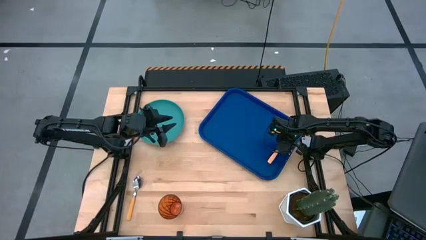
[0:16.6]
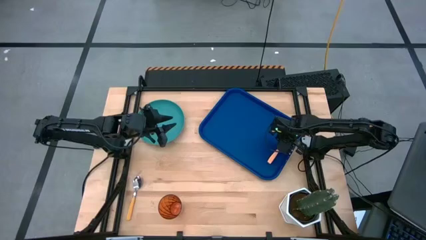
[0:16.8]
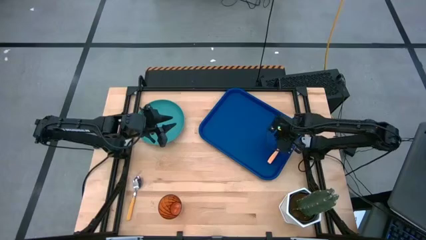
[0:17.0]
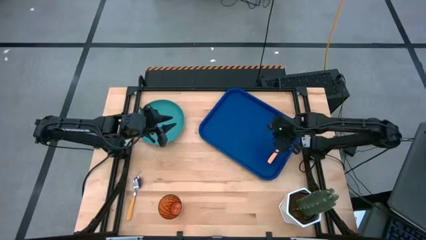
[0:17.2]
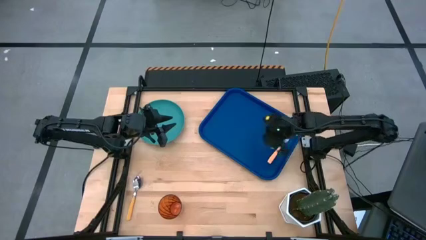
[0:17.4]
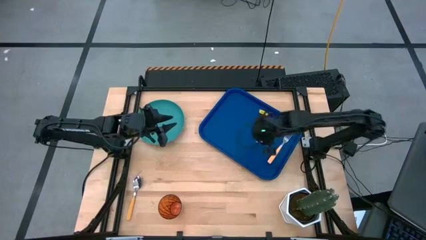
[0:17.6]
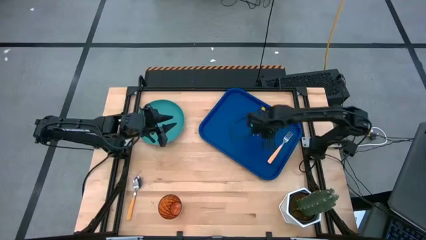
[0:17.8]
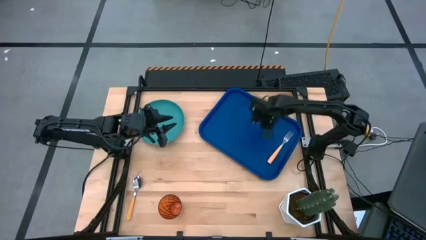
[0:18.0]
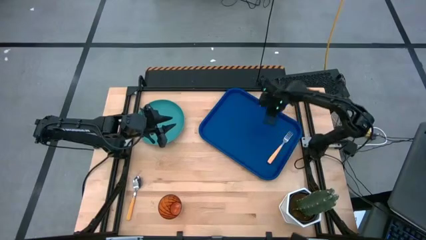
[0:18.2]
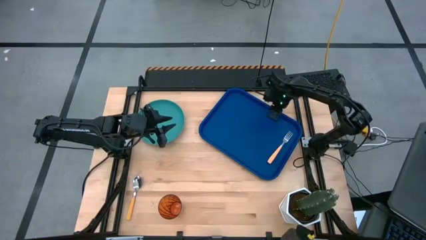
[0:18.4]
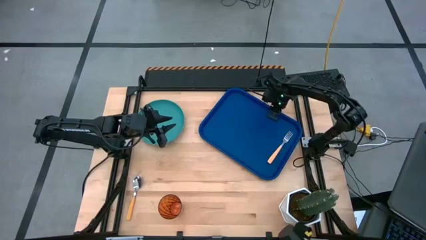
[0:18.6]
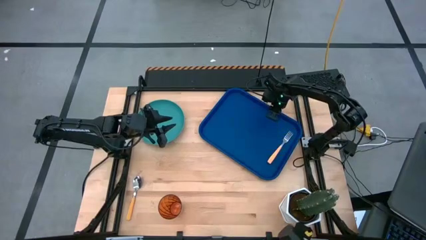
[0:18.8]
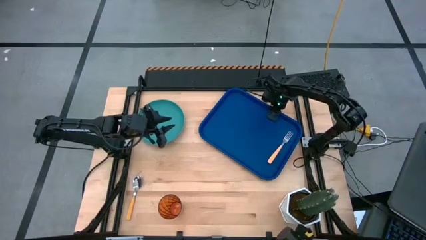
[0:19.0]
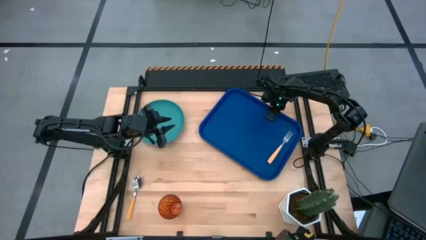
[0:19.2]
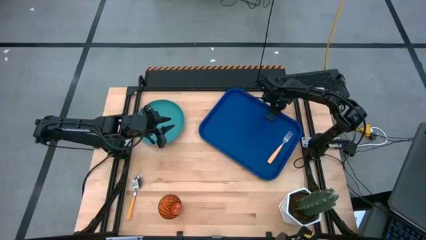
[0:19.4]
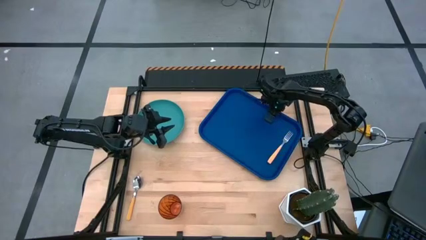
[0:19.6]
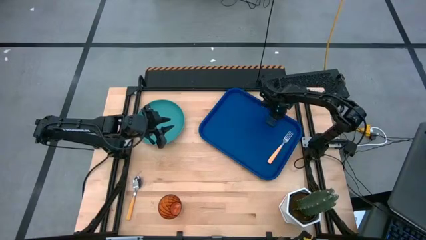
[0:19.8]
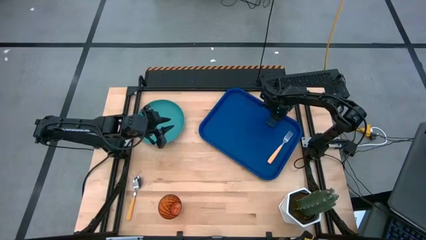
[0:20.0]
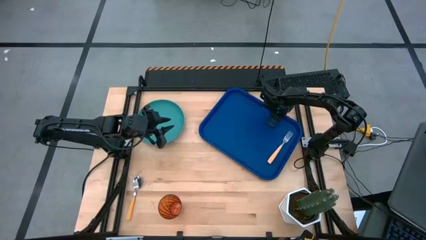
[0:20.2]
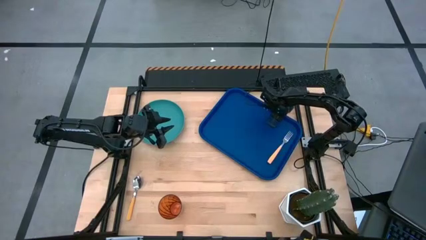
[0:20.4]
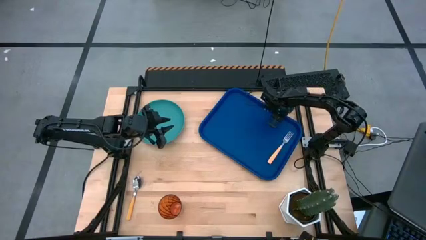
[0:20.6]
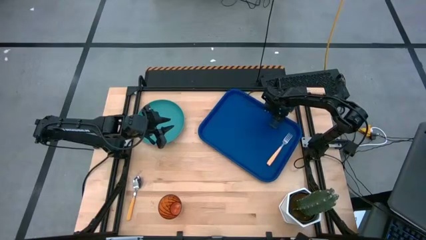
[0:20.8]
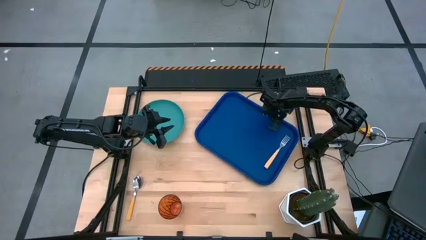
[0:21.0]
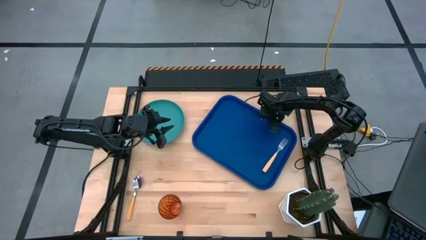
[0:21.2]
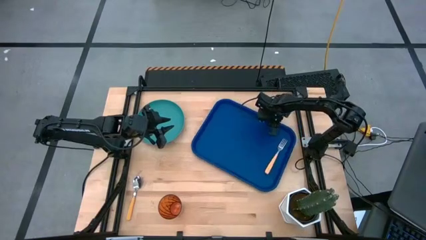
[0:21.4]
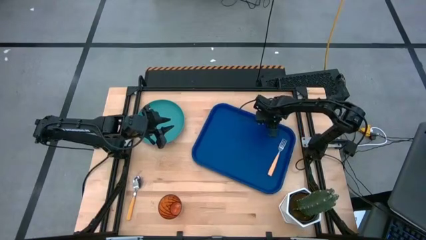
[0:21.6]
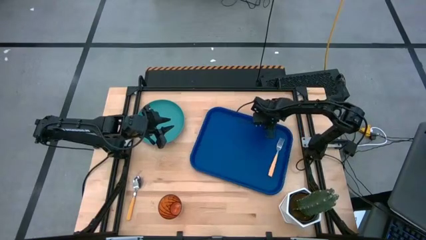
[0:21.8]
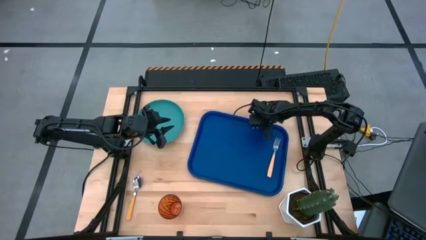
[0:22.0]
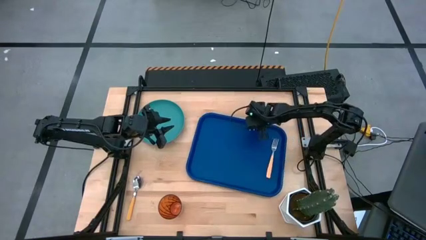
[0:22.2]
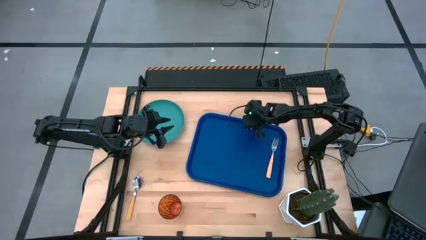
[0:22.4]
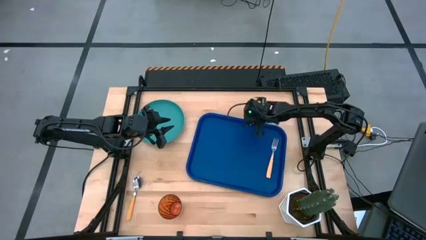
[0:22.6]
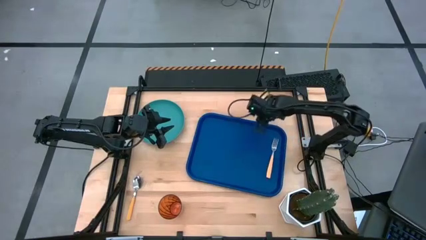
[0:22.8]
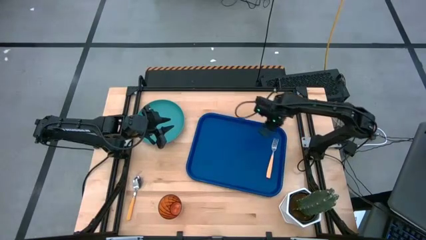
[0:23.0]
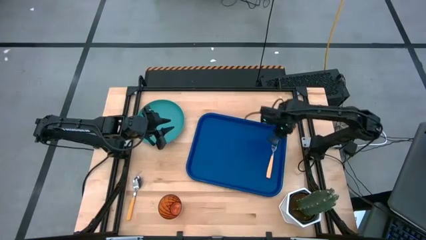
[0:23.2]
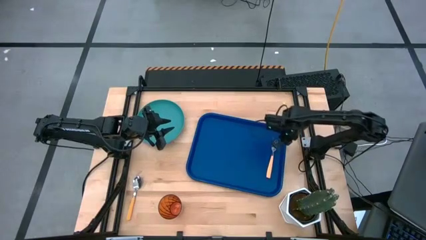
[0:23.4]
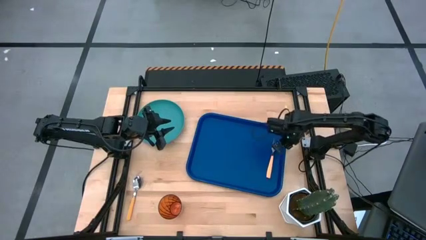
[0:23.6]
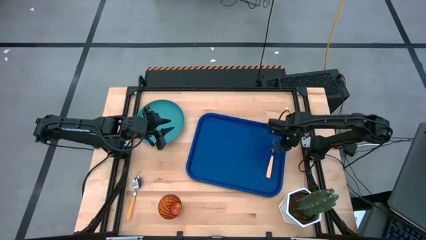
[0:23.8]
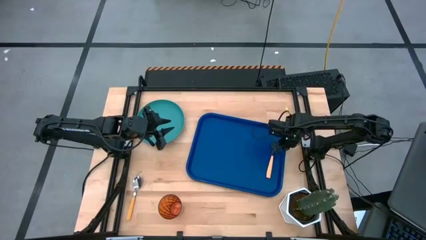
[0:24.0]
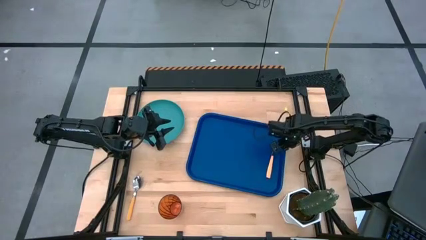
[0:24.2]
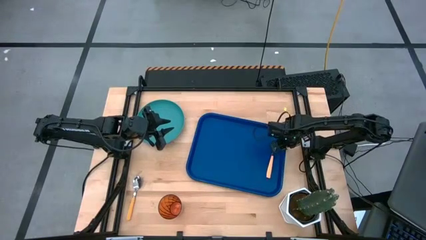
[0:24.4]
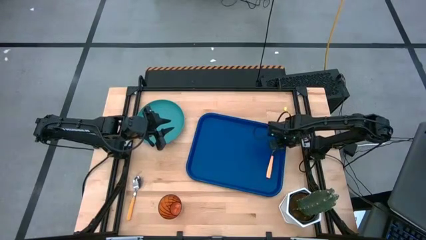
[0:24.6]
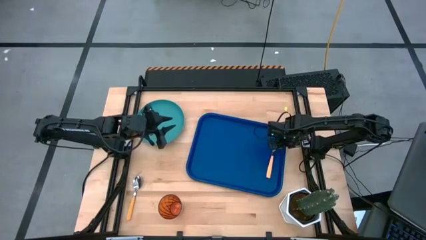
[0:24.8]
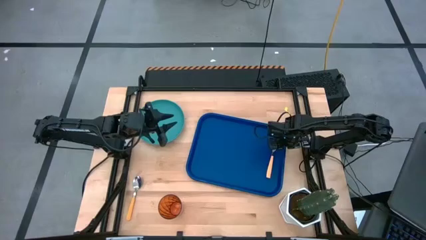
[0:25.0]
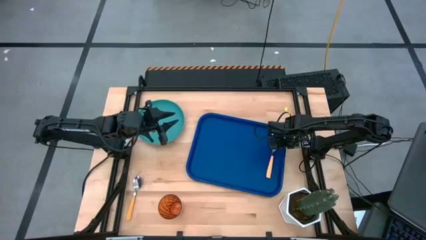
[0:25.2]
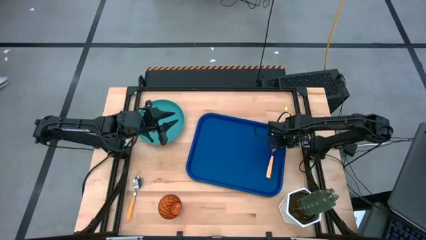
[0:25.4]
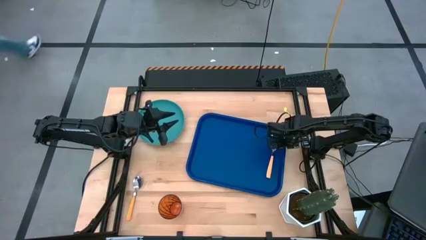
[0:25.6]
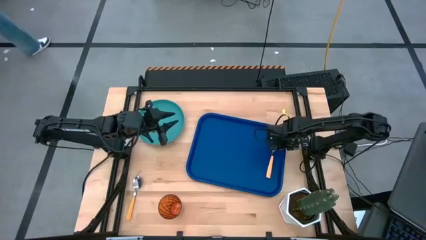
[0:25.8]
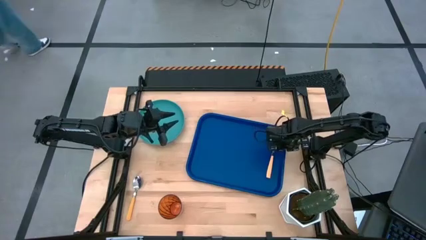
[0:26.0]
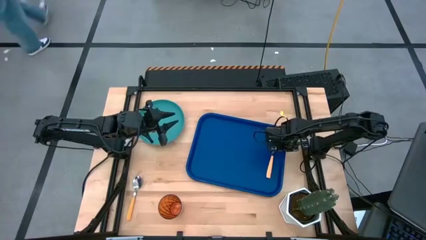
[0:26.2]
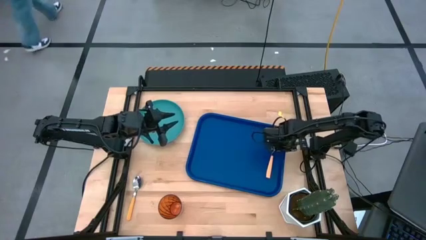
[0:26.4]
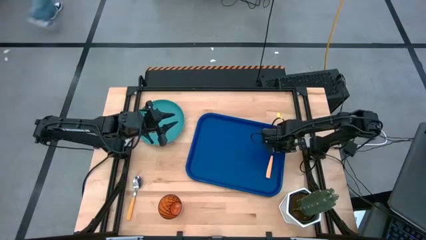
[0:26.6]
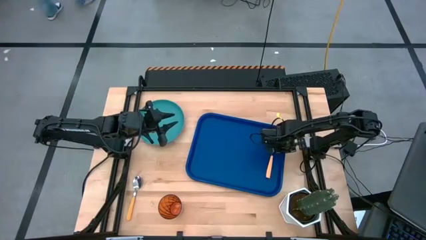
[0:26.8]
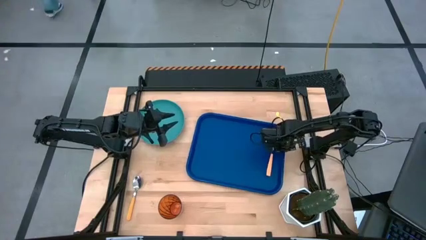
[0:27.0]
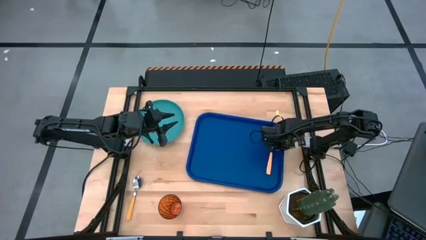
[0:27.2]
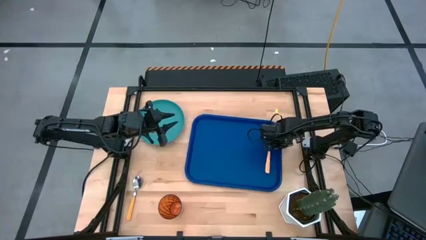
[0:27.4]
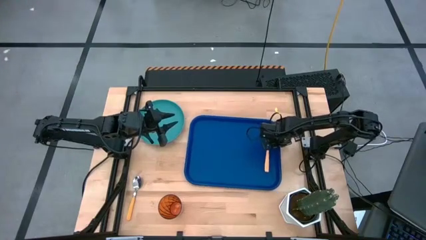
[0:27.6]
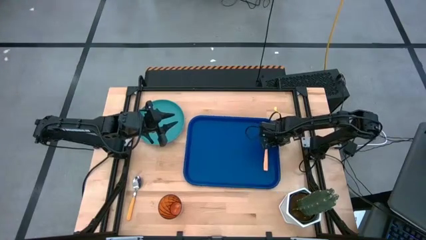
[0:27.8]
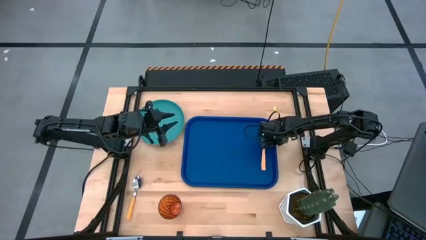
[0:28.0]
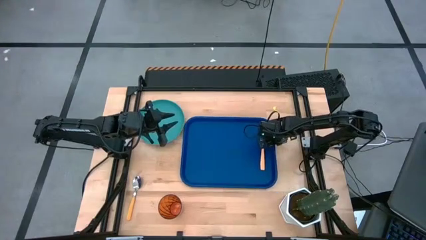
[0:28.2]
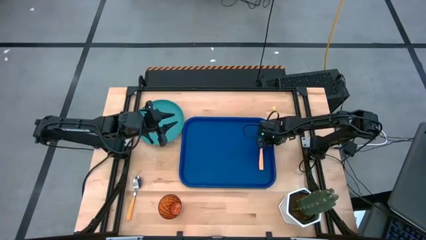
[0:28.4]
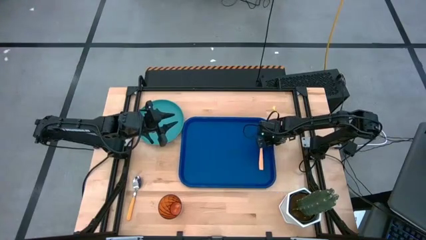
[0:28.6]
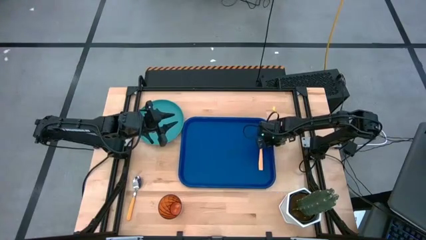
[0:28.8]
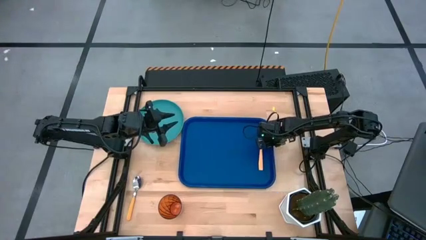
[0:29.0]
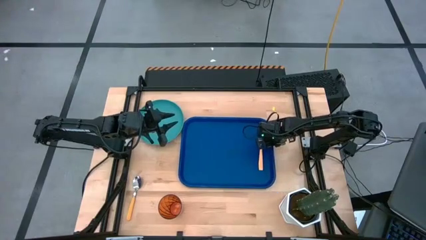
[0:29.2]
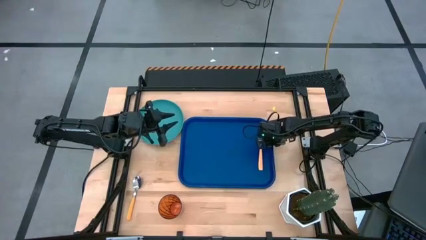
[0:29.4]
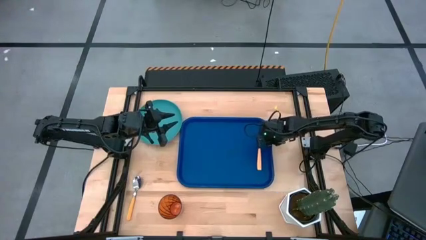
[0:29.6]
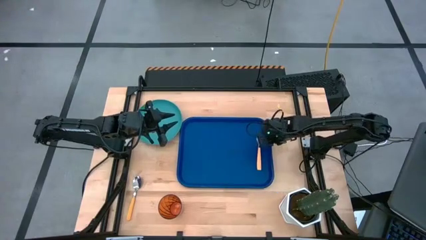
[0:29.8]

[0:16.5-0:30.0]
Task: Pick and place plate/cup/fork/spoon on tray
Move the blue tray to the center of the table
